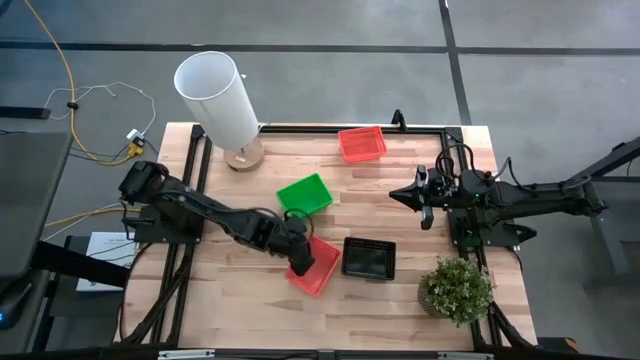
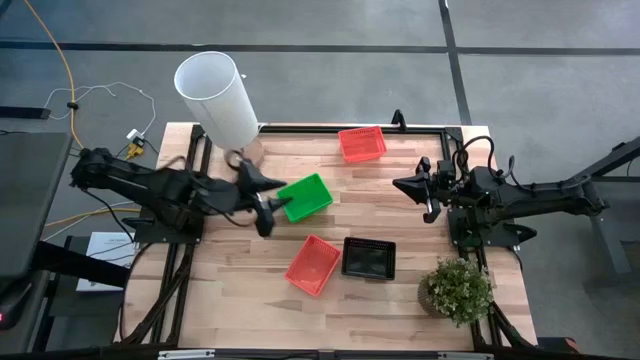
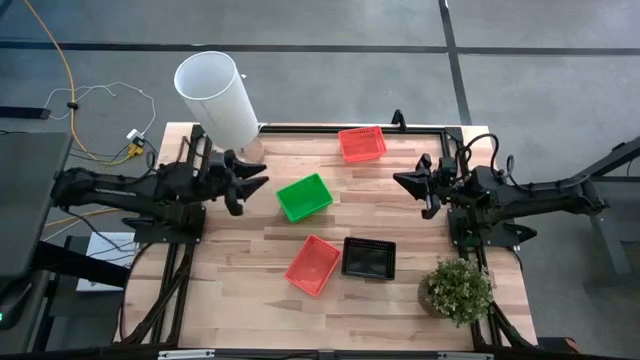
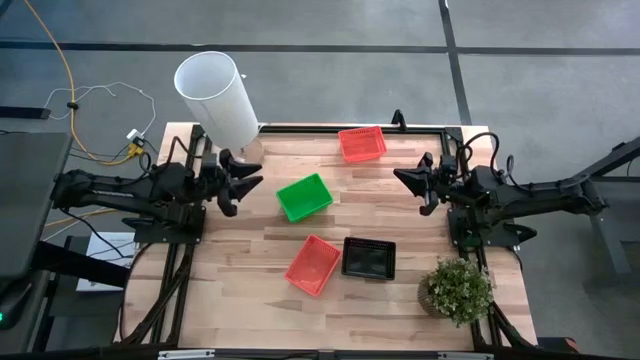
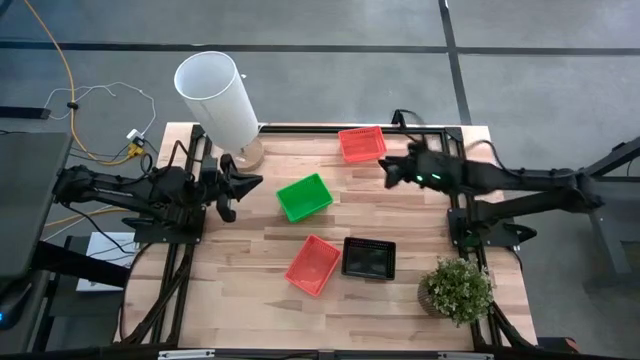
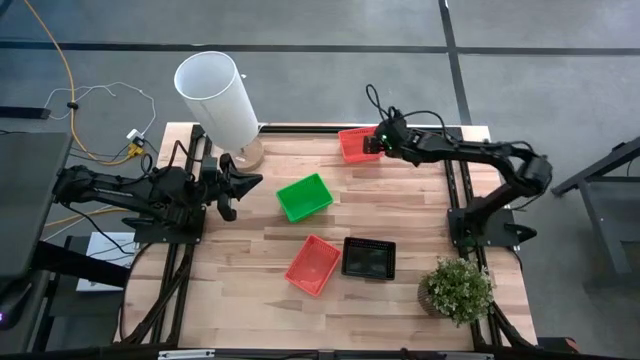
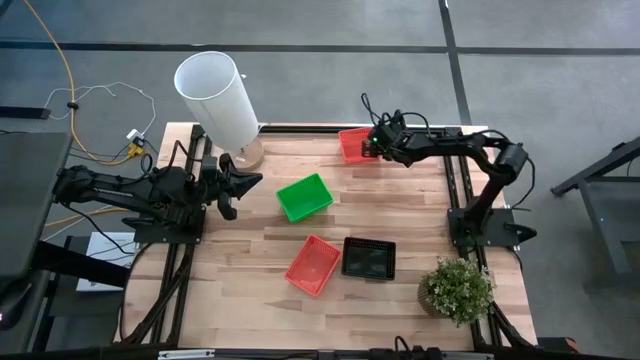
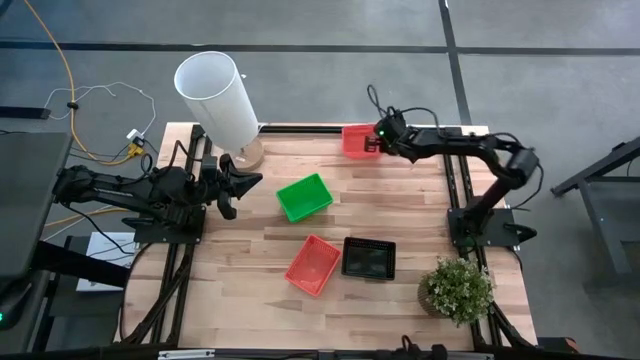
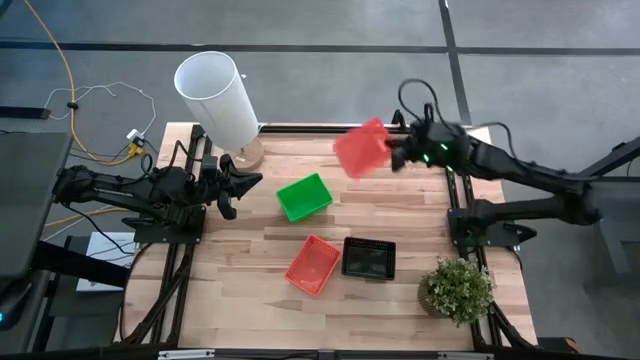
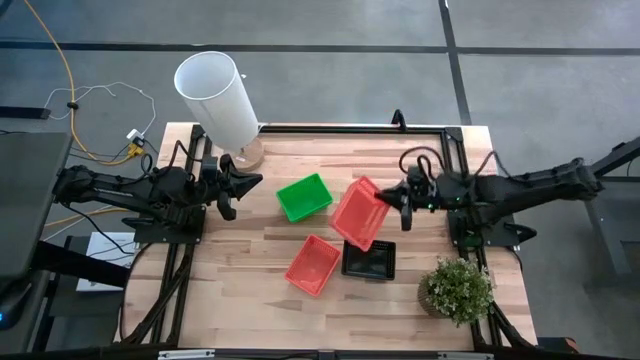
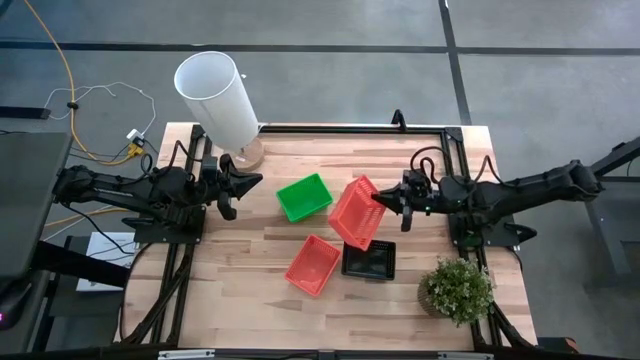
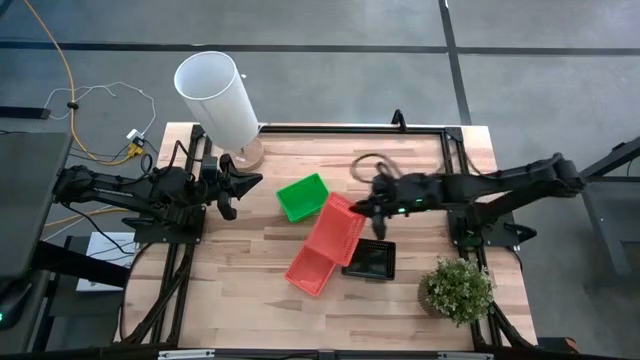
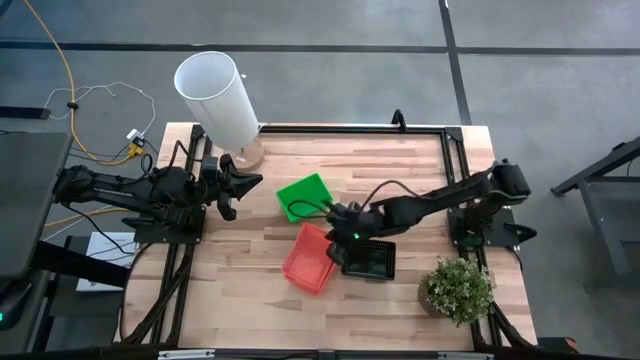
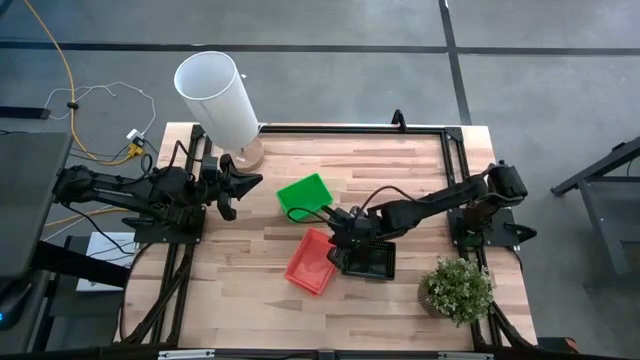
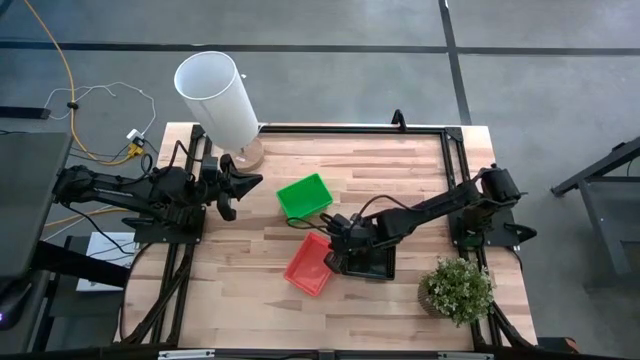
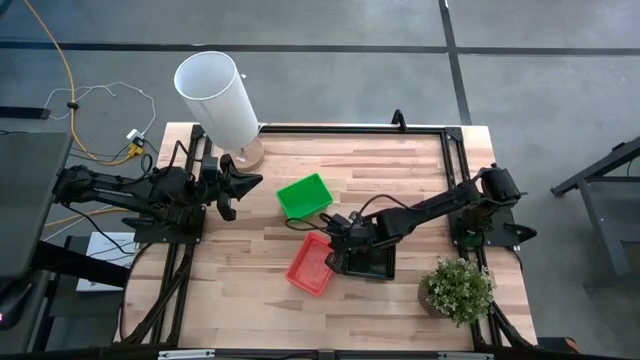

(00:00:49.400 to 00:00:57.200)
Stack the orange bin on the orange bin

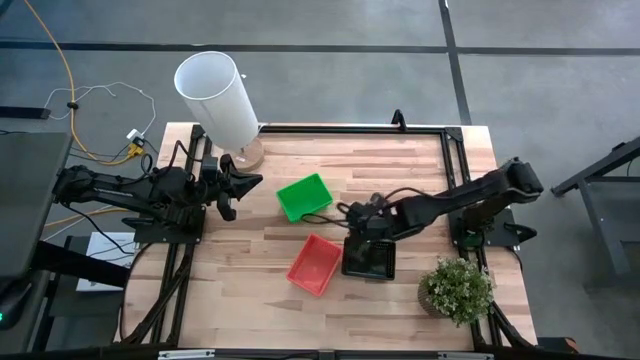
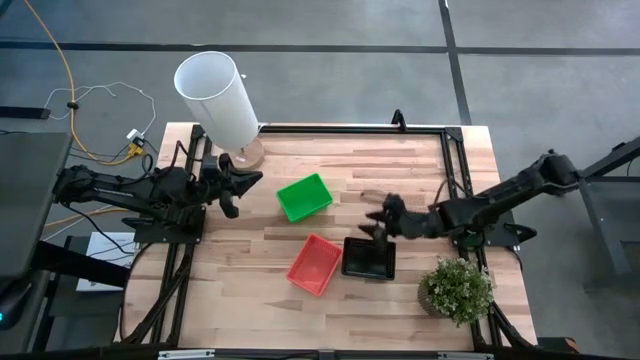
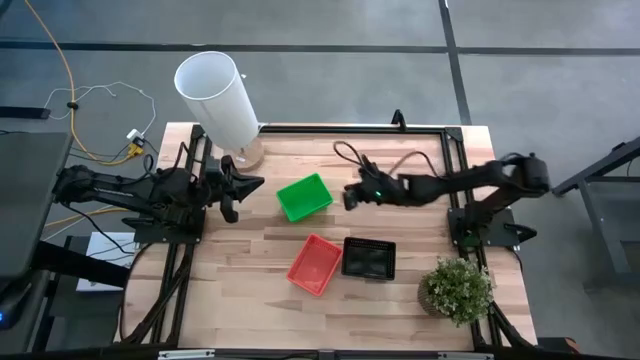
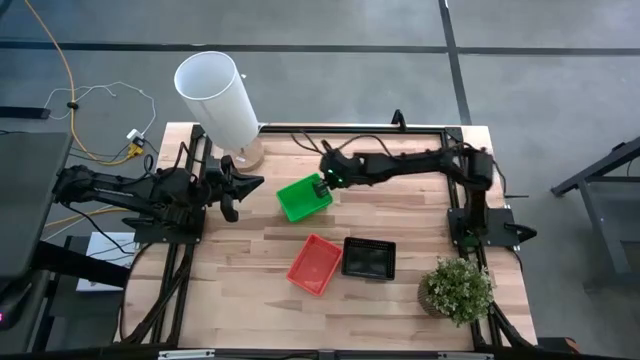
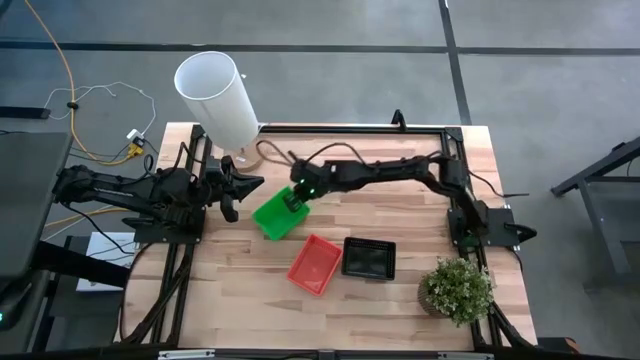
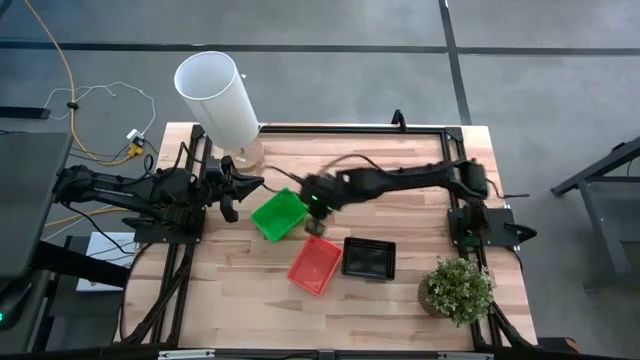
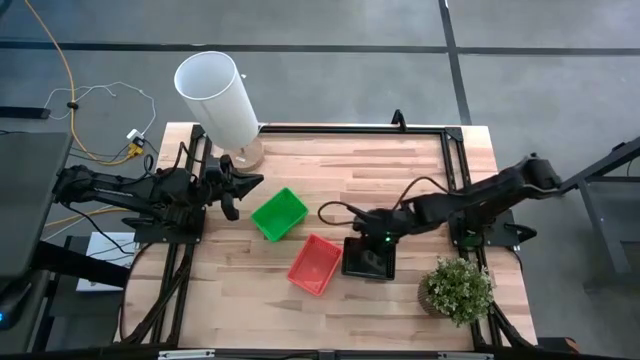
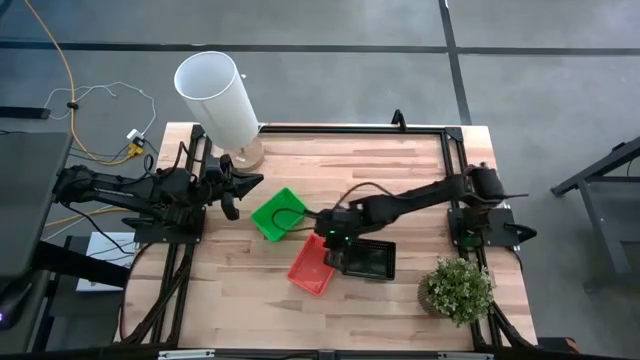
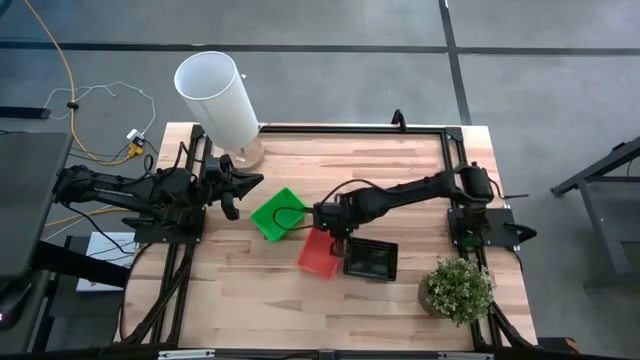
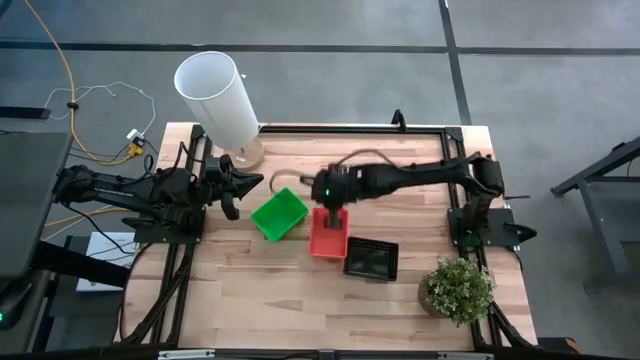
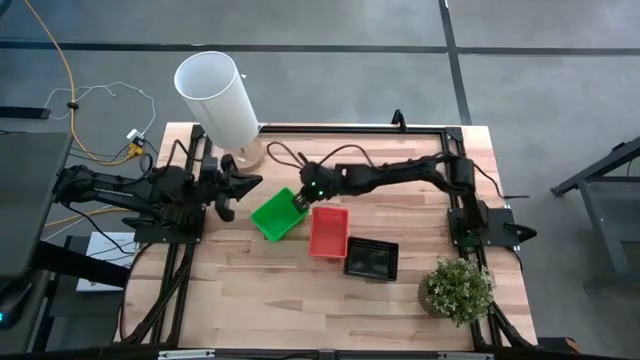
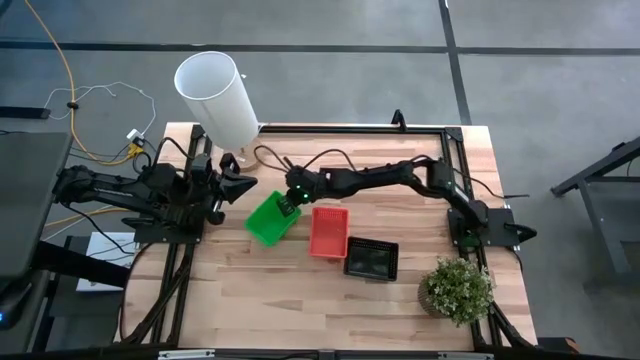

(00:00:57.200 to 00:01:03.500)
Adjust the stacked bins on the table

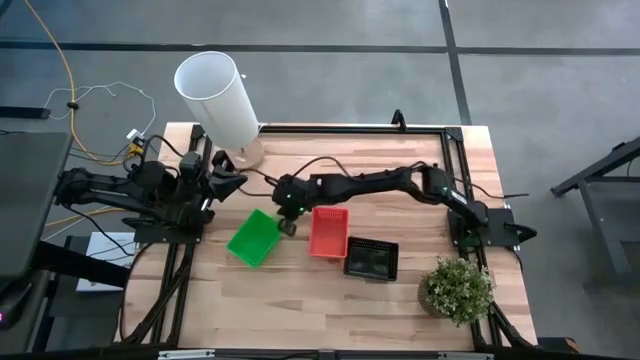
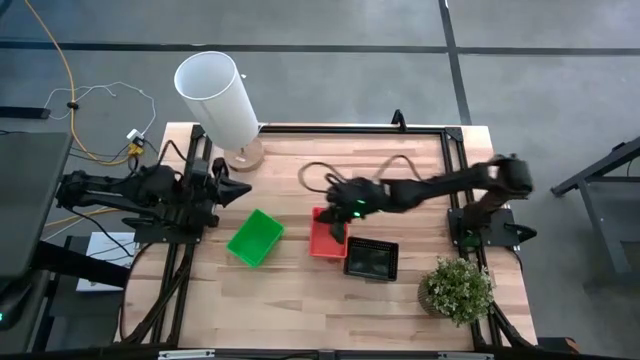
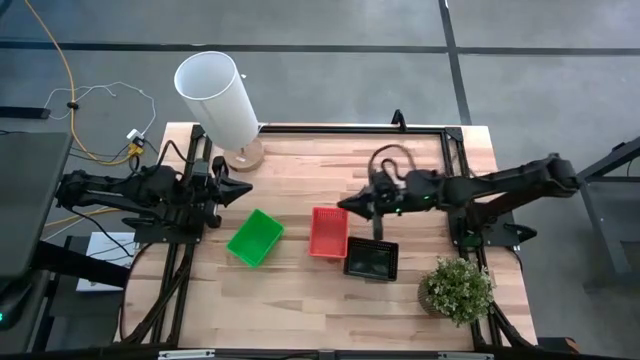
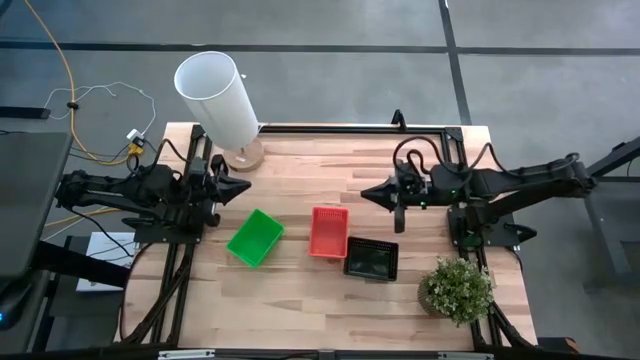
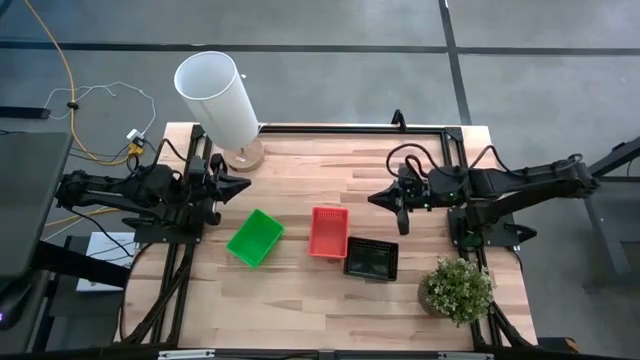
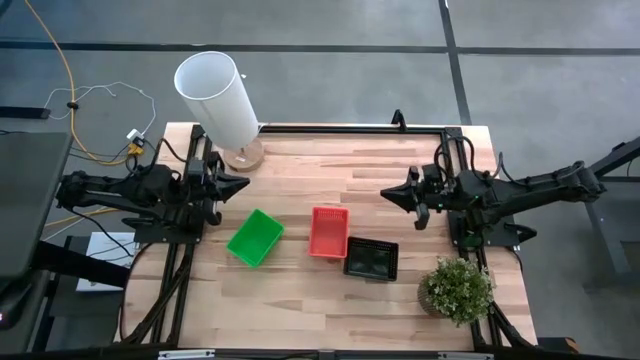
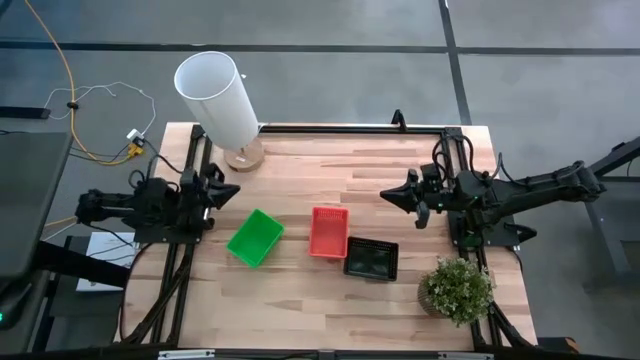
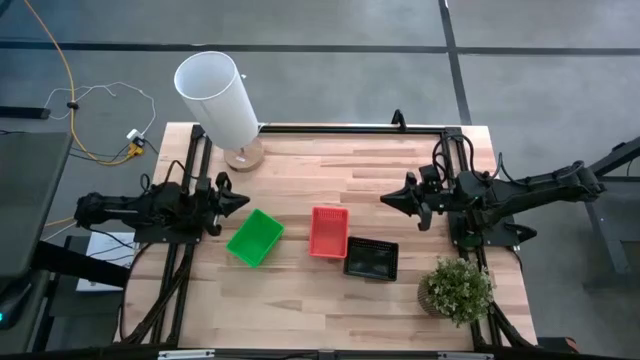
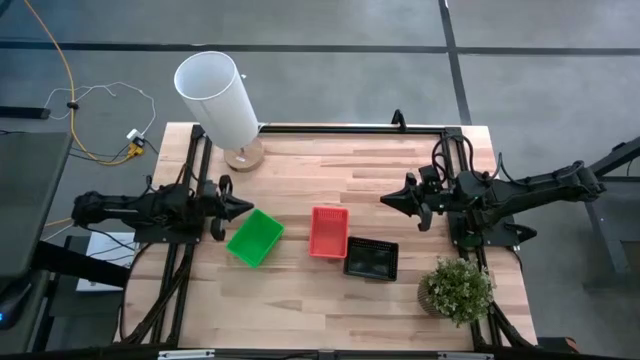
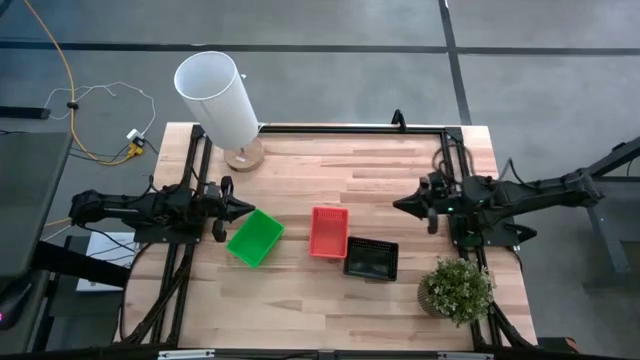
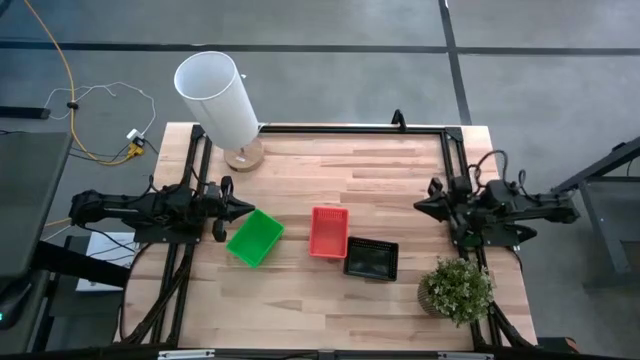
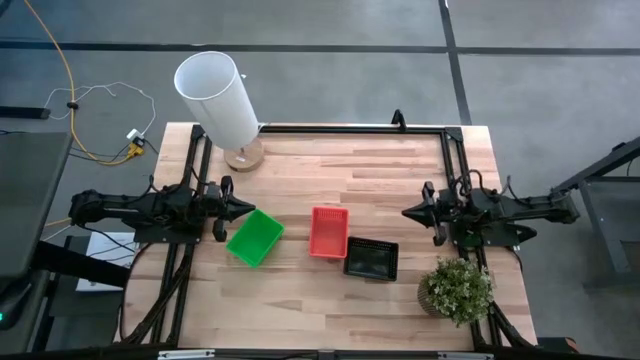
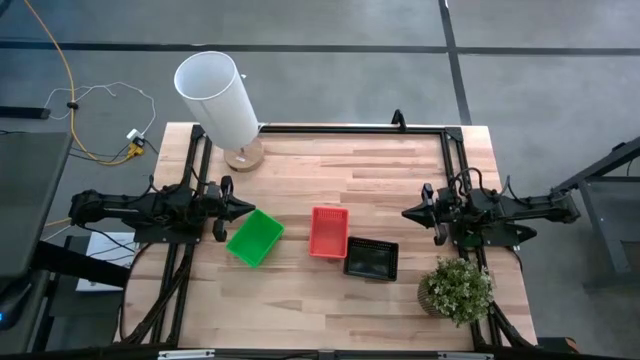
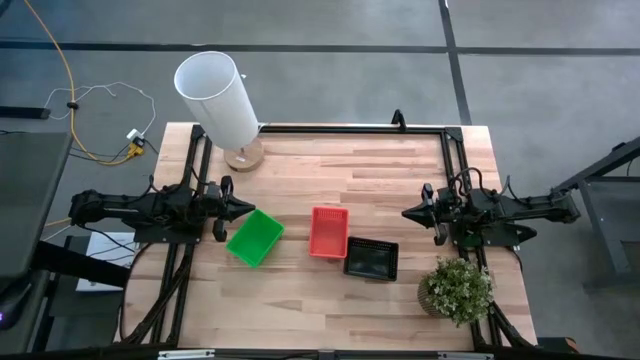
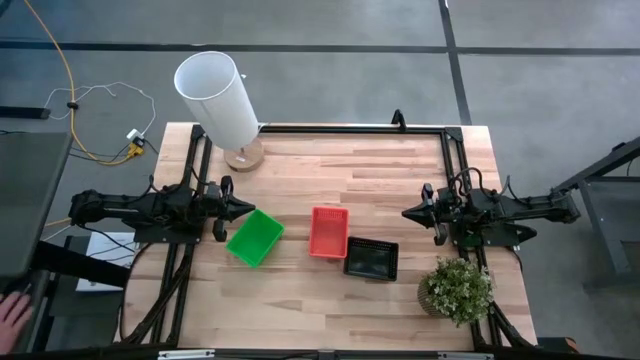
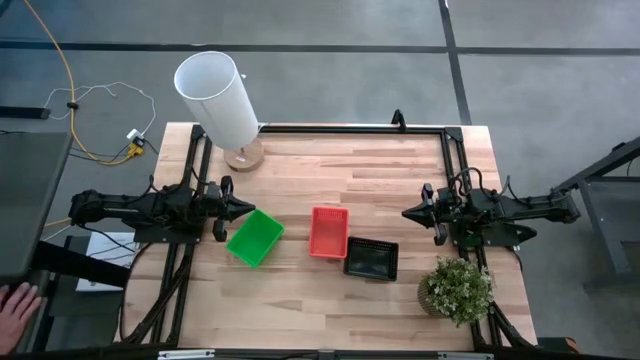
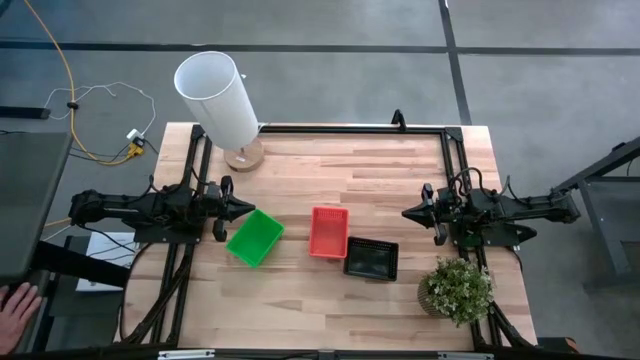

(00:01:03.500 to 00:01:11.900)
Return to Home Position
